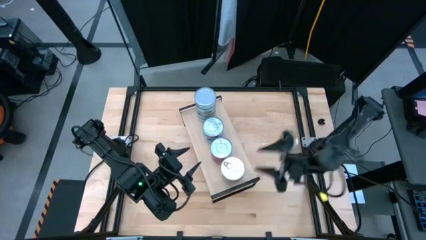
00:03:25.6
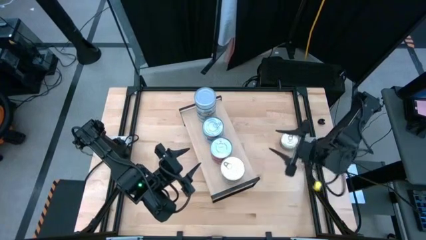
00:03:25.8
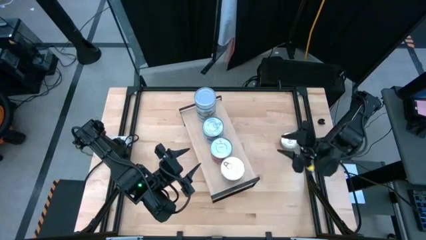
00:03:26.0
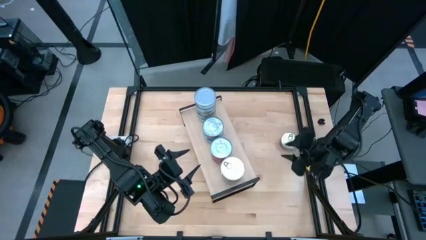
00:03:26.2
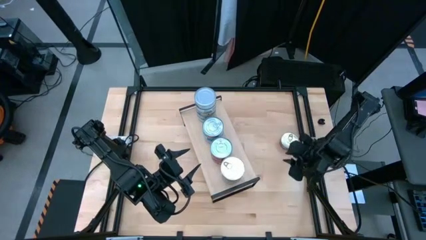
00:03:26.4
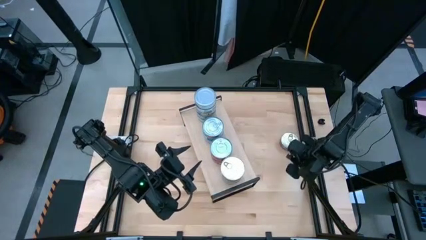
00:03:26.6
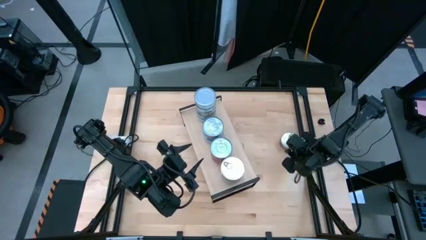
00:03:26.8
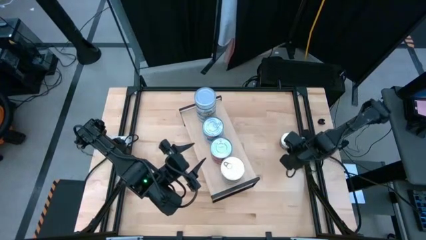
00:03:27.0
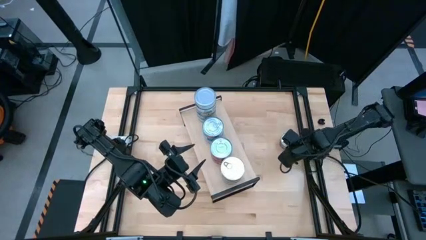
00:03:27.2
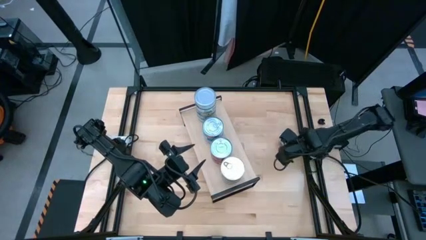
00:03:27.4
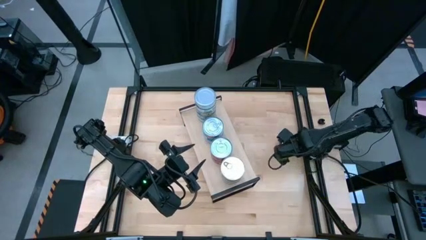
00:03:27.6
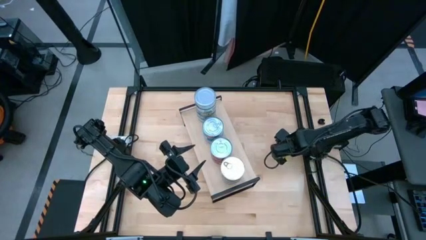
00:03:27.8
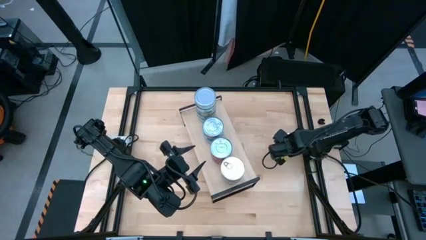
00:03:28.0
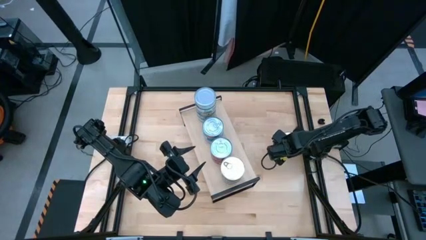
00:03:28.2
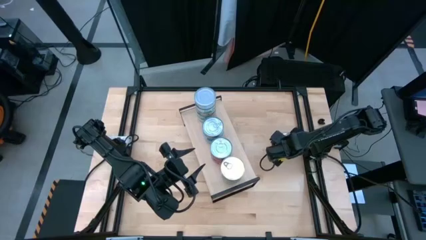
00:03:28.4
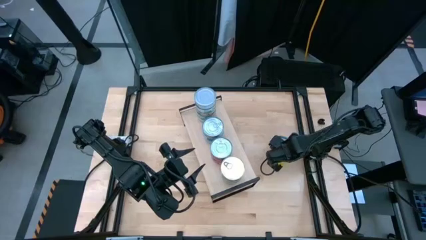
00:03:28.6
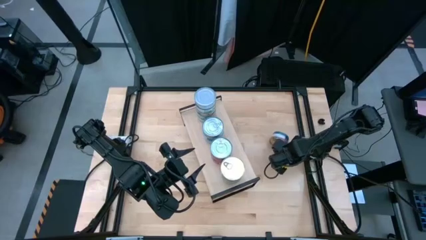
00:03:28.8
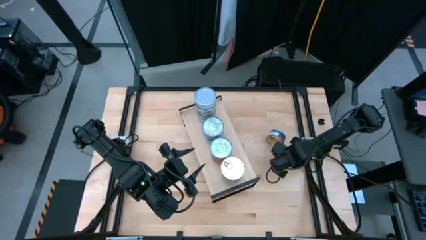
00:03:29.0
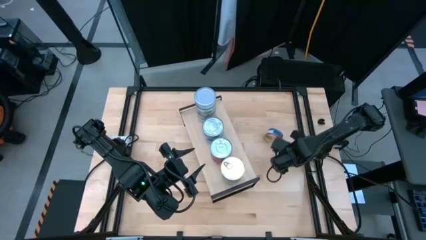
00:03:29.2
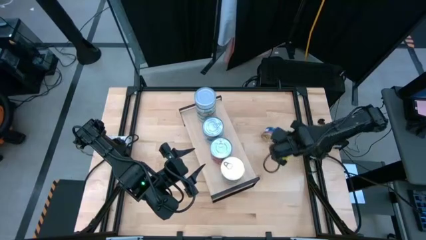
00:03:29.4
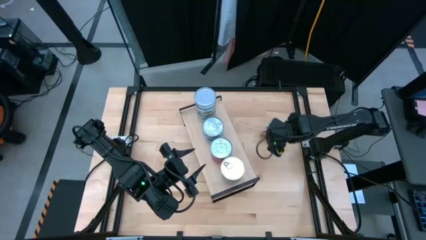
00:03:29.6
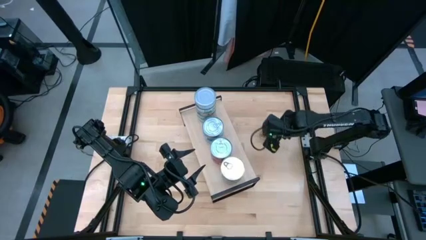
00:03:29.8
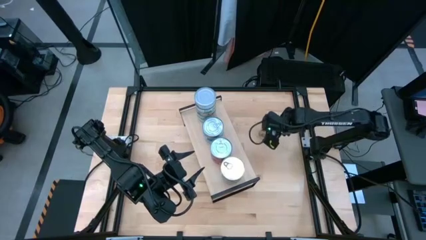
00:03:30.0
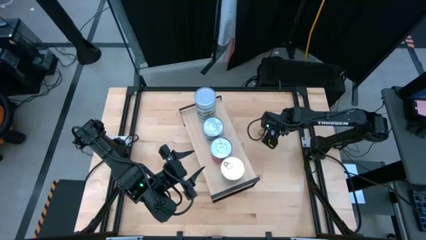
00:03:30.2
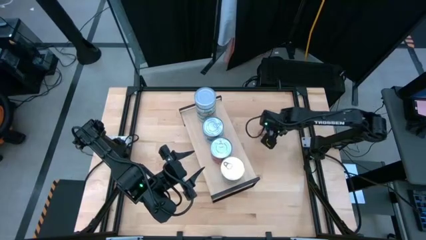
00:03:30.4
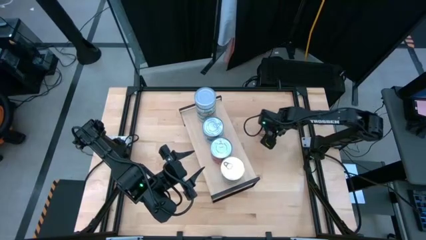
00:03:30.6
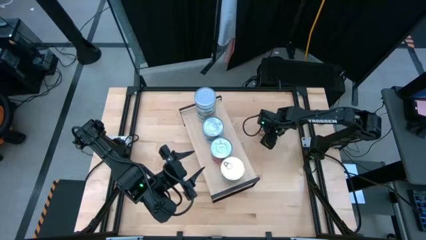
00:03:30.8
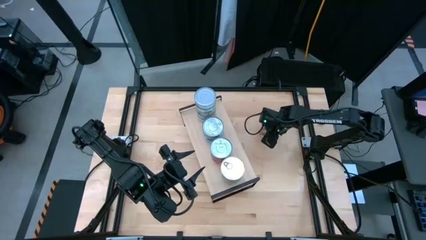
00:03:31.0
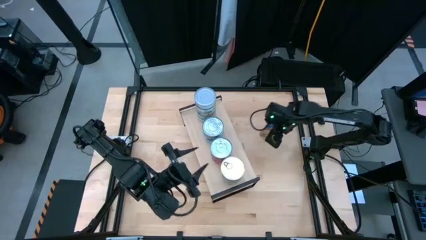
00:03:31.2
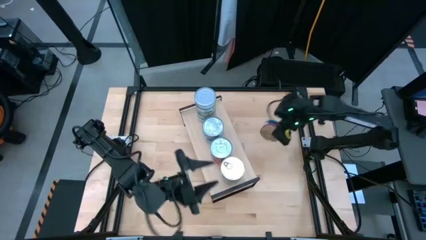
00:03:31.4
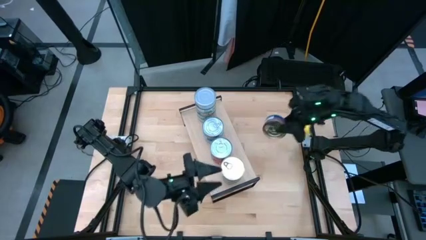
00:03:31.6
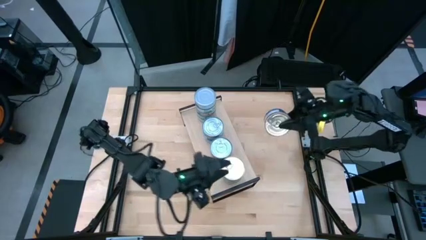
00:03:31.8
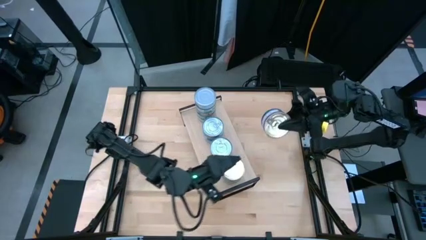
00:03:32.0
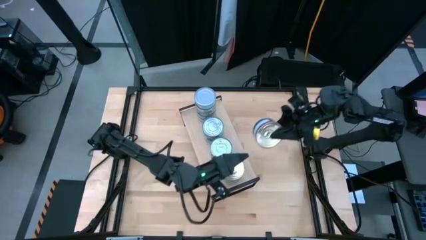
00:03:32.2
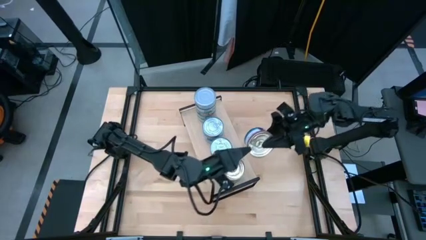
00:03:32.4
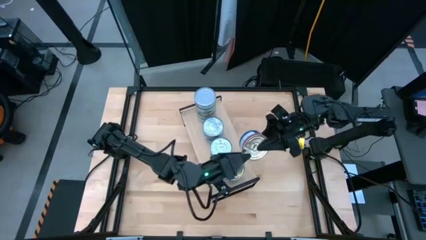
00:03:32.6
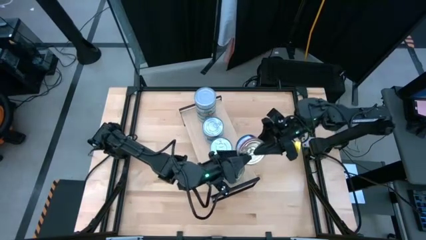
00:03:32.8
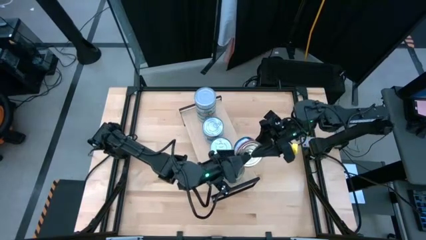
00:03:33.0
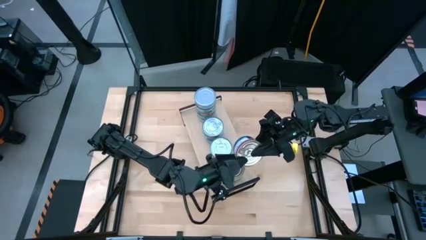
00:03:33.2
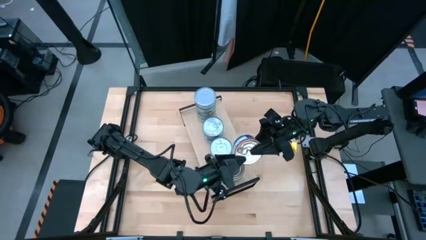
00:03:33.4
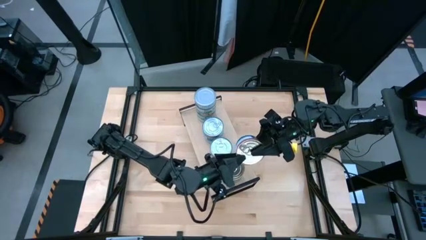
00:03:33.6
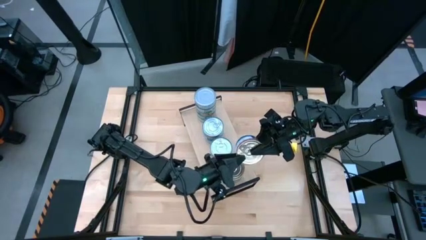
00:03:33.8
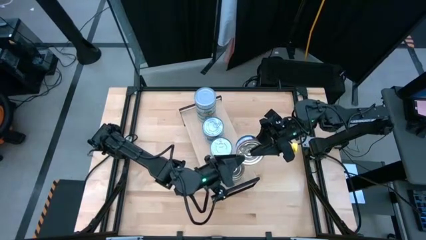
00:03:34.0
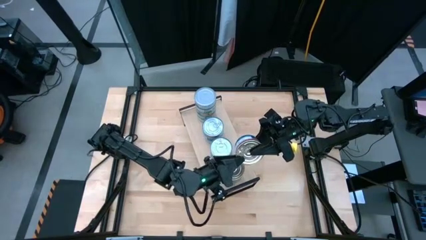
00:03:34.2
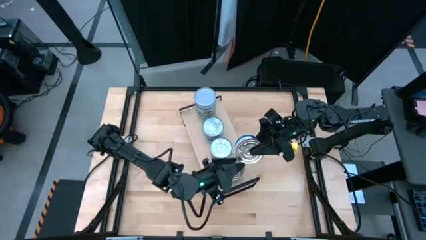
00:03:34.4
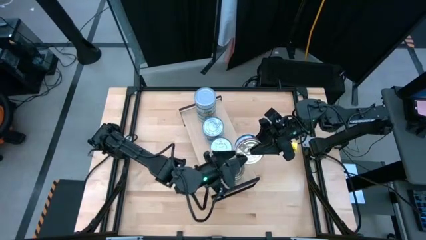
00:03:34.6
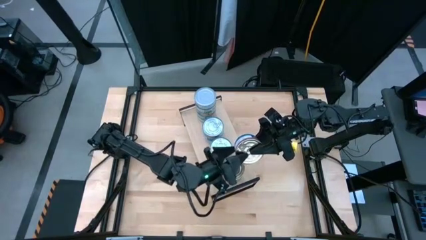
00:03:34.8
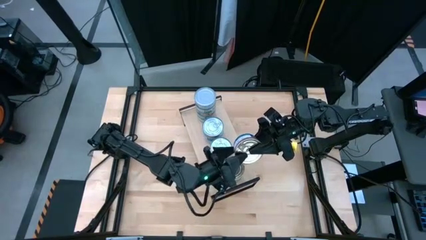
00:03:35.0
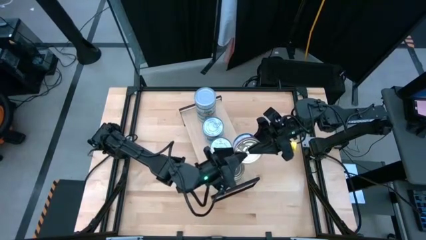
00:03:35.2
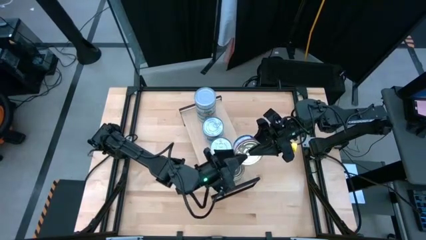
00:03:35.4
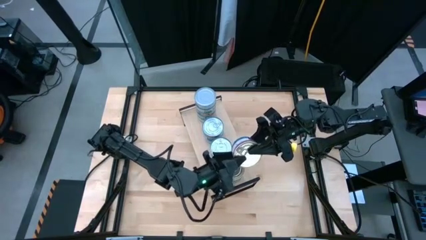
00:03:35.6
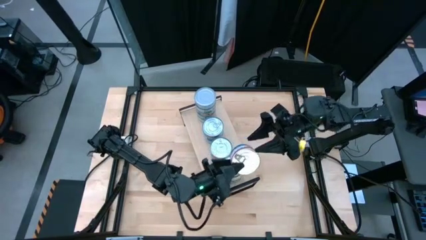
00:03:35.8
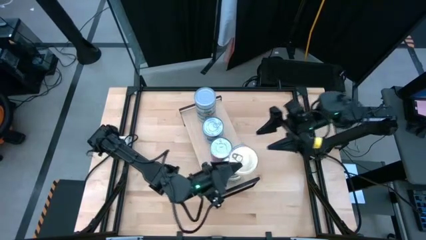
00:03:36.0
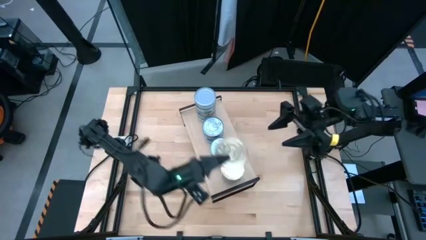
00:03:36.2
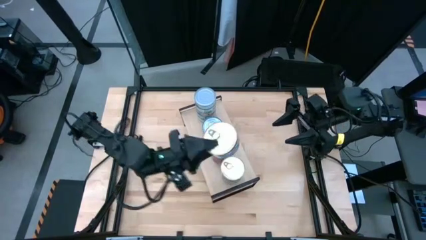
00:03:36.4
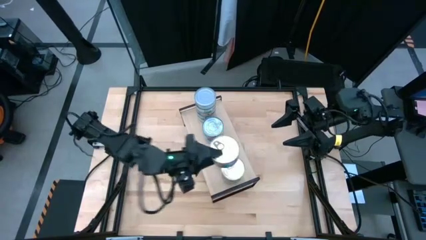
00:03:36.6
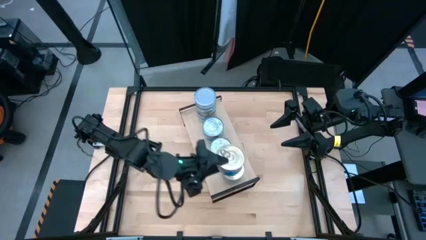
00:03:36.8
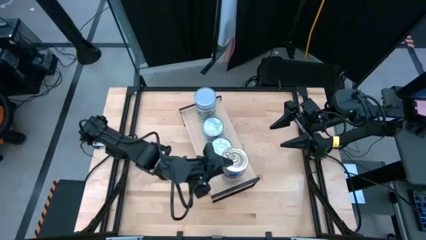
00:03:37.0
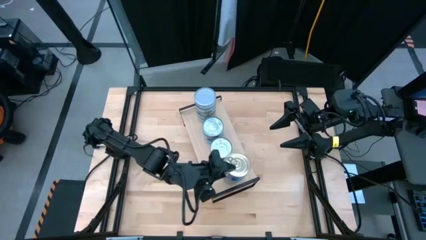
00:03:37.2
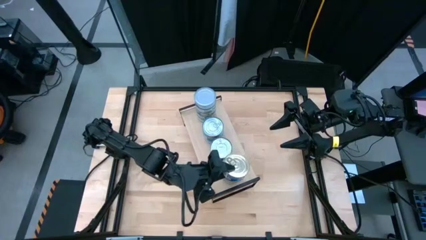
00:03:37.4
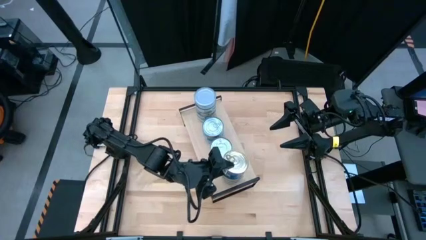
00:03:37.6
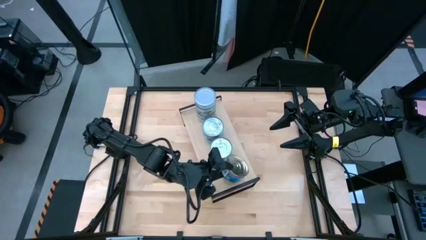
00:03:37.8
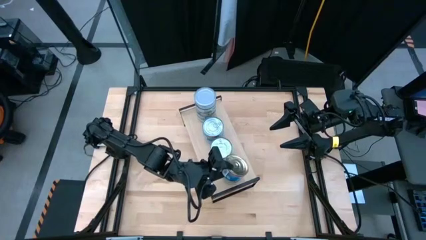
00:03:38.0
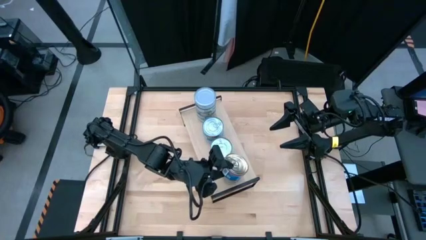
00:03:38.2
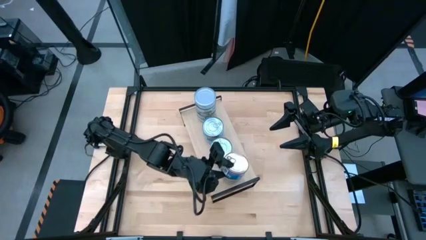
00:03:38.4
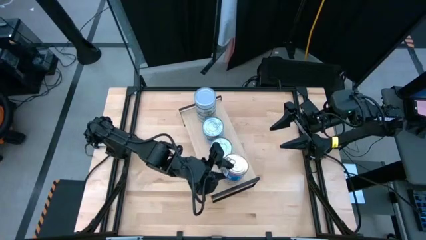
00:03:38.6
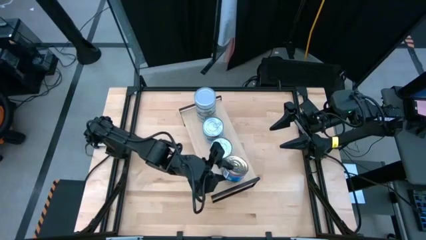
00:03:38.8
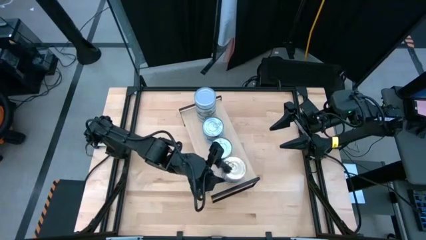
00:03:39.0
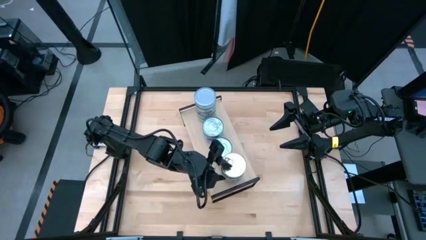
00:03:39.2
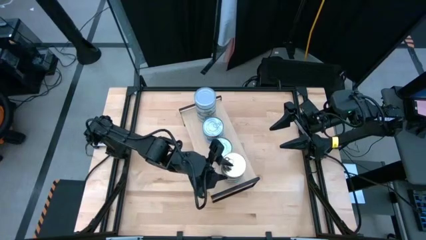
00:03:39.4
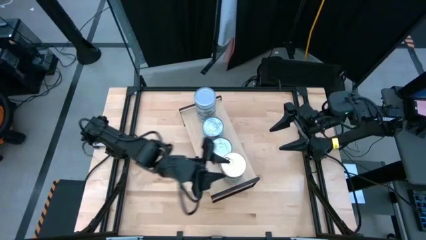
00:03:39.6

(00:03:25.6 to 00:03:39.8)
Task: Stack canned seafood by type on shelf
Stack the blue and pink tuna can on top of the other blue and pink tuna can on the shelf
